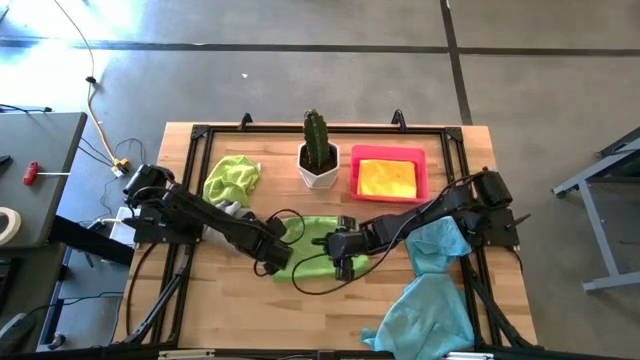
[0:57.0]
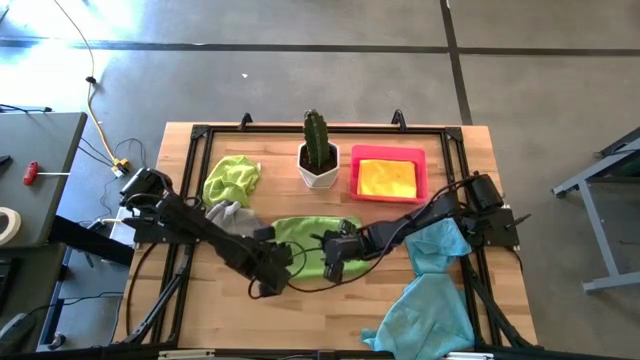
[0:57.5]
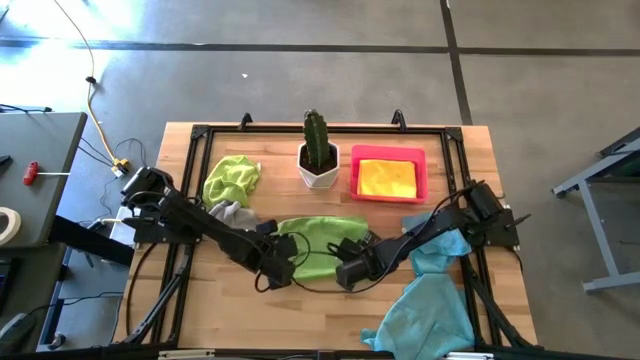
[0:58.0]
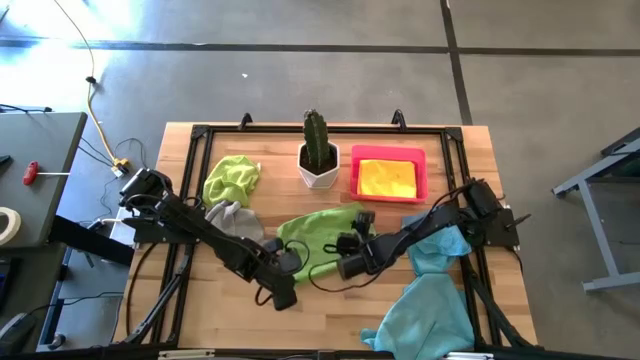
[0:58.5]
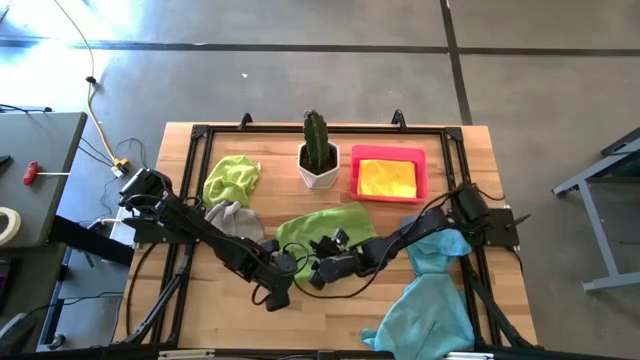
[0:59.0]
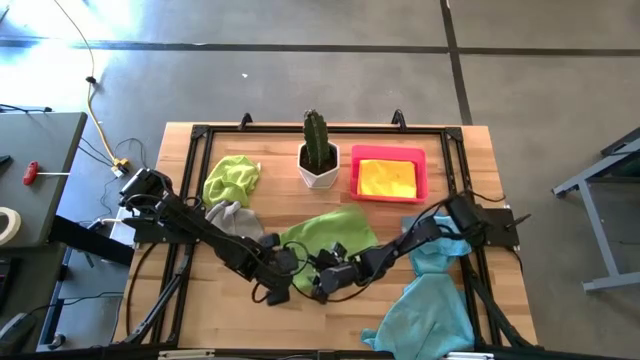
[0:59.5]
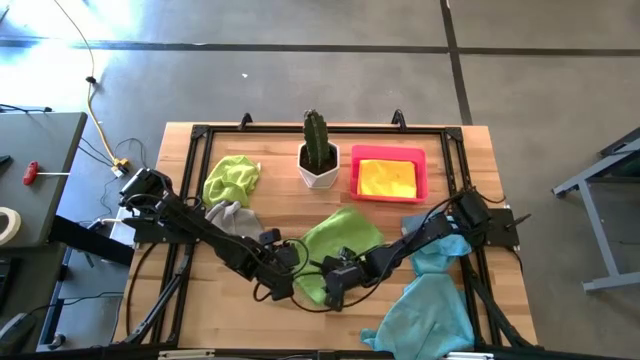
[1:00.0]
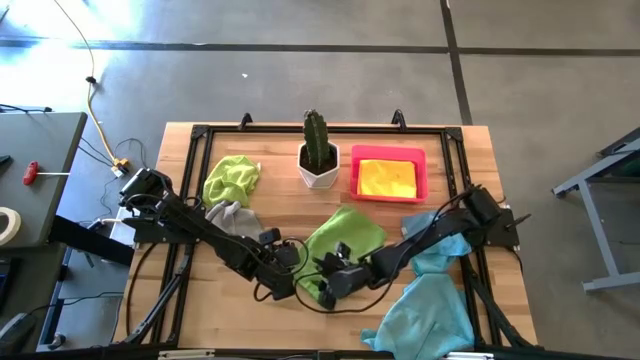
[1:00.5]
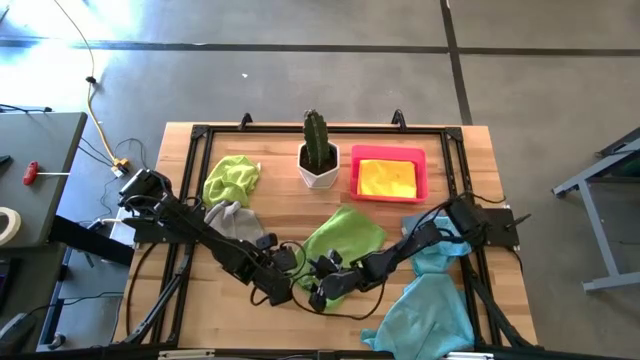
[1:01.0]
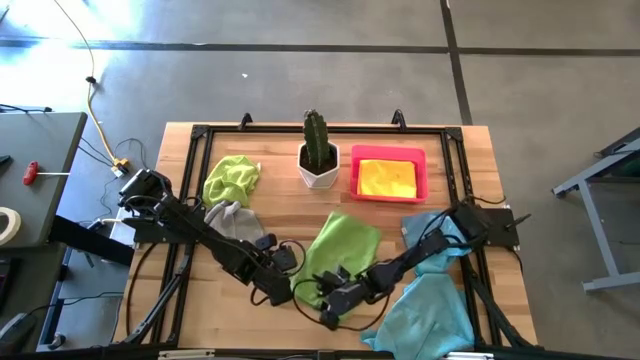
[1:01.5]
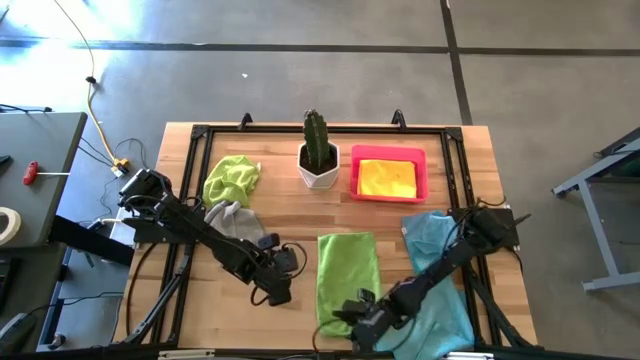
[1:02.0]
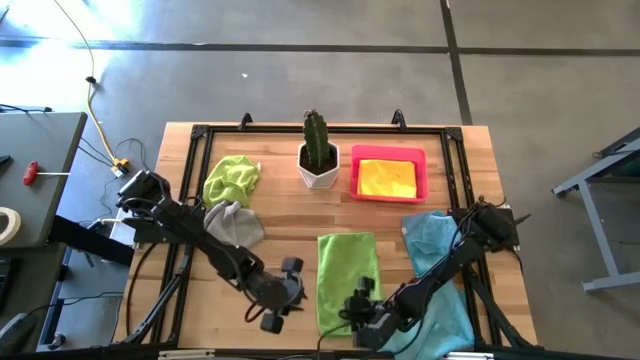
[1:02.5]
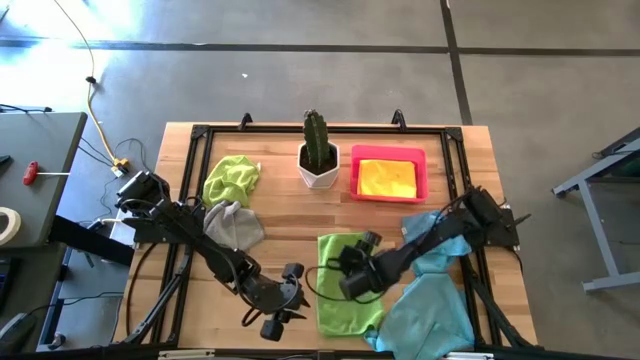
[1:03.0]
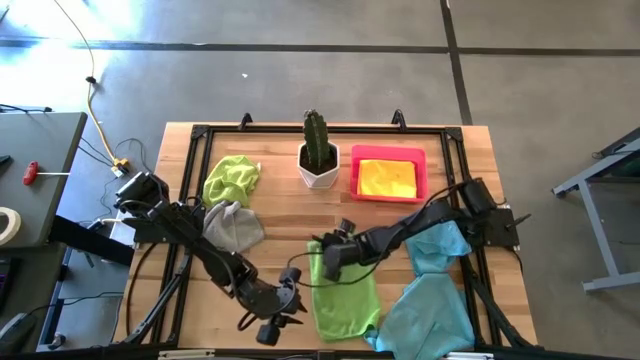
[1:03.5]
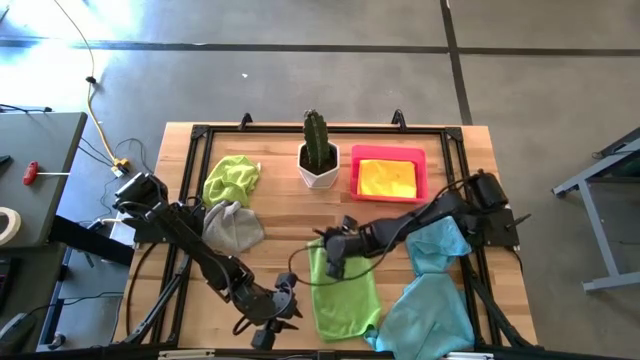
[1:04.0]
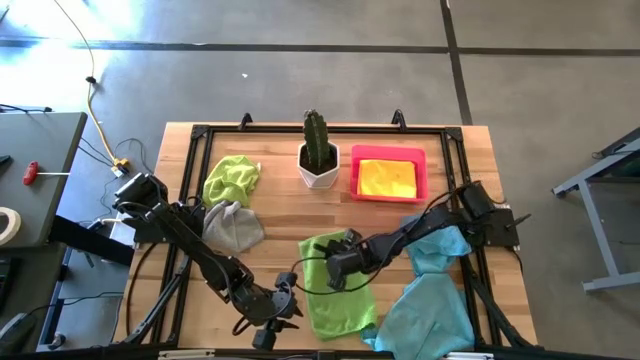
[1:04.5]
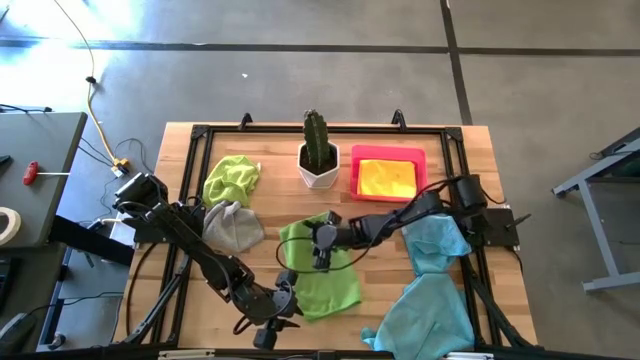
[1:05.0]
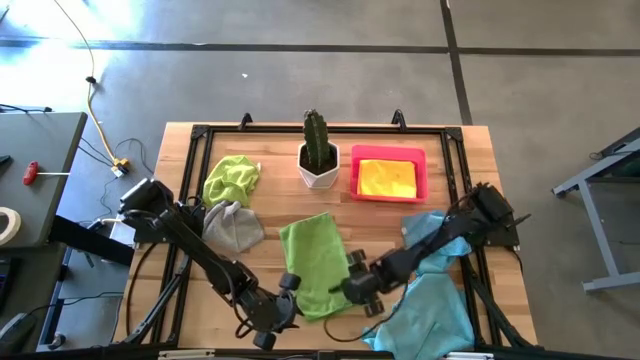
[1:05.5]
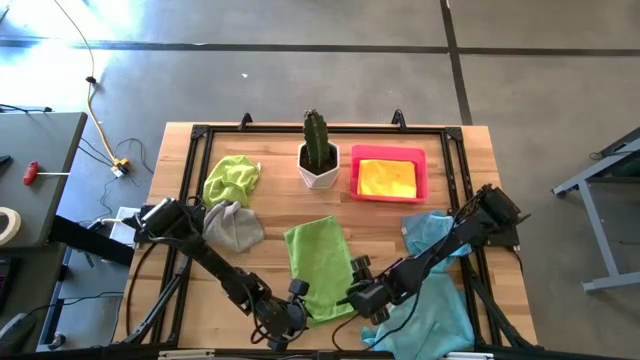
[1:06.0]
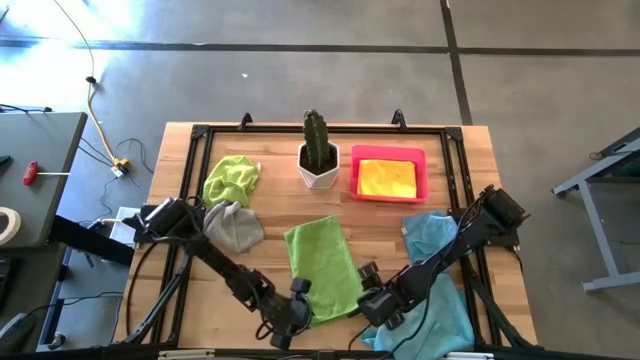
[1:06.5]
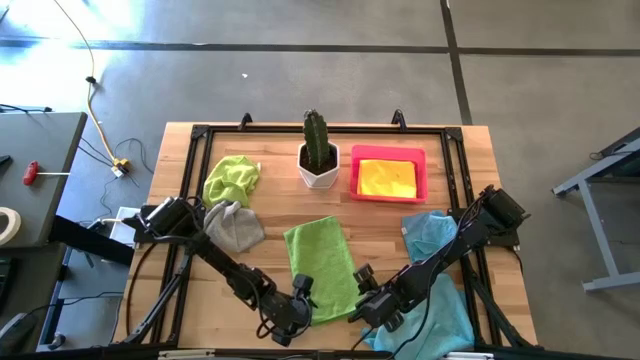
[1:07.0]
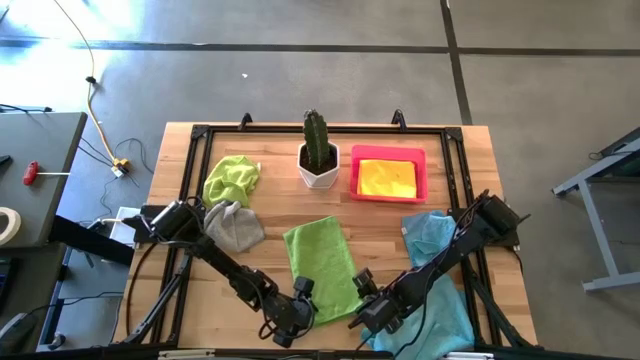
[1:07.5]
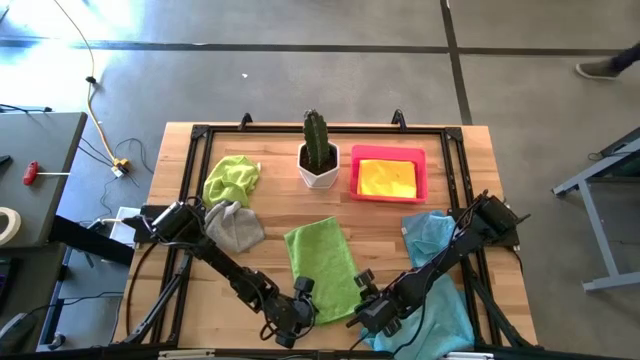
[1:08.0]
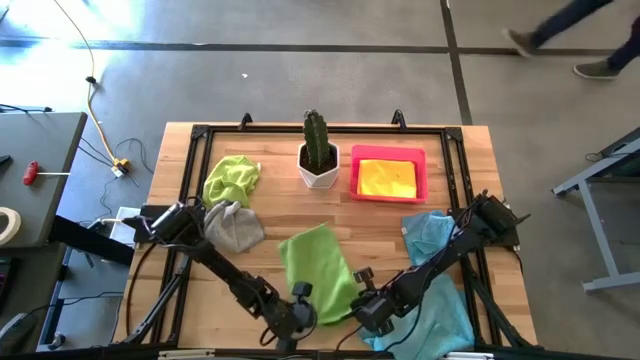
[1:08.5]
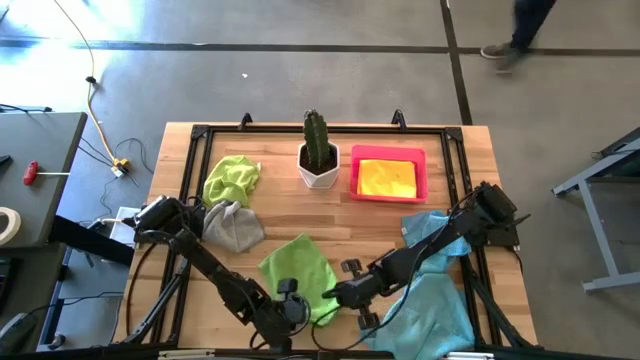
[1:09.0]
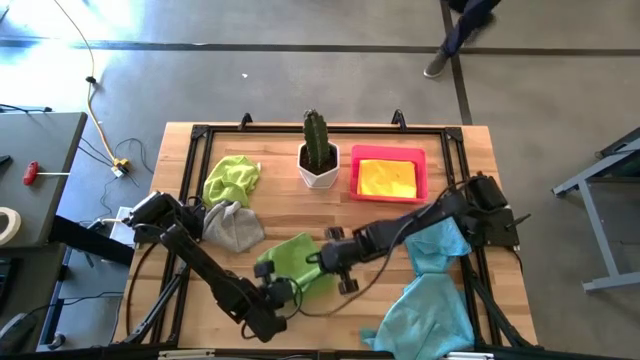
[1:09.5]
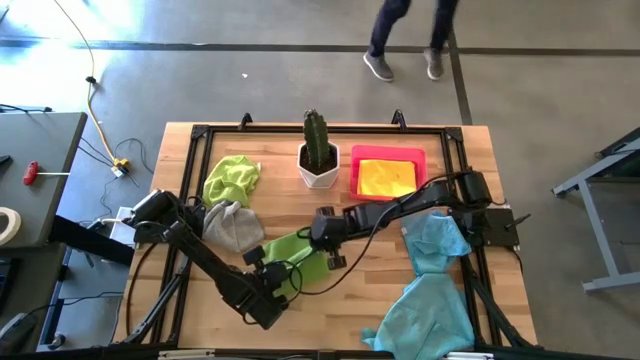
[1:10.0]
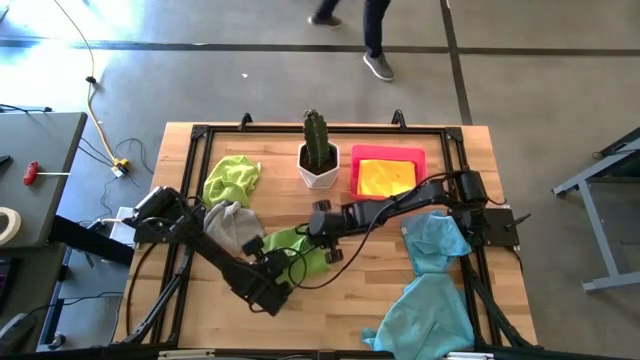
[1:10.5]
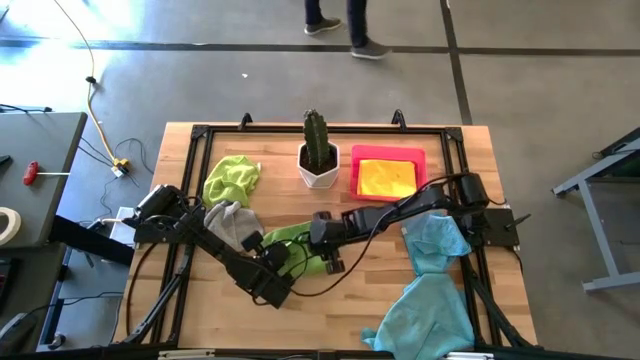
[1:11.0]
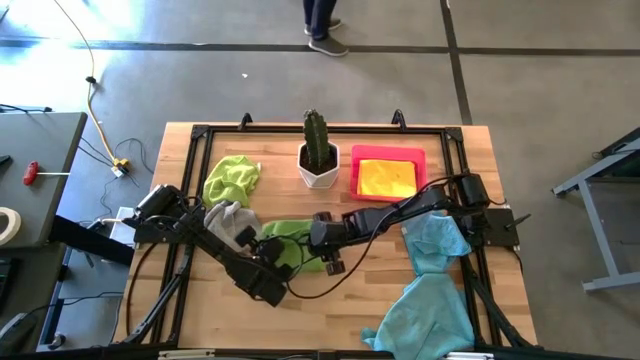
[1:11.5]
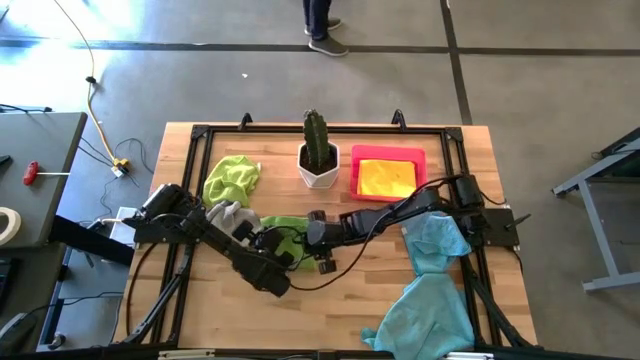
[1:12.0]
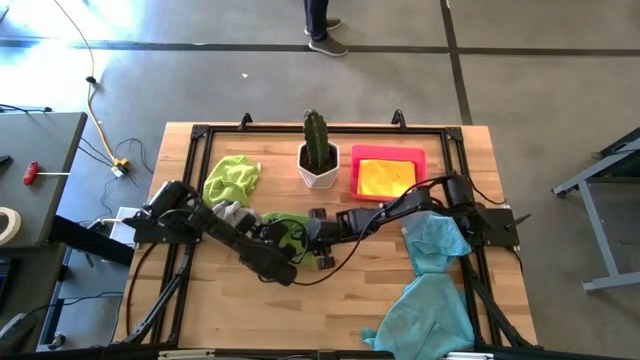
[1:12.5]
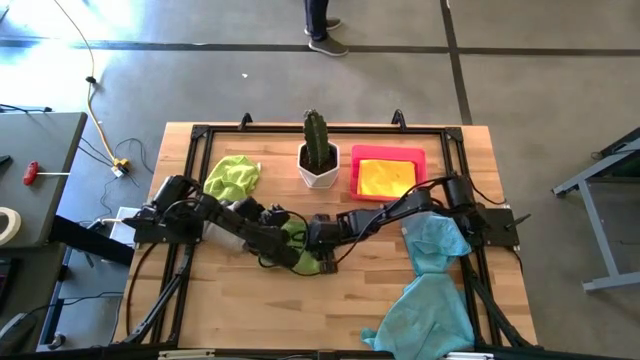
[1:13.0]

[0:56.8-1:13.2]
Task: Fold microfiber towels
Fold the bottom green microfiber towel

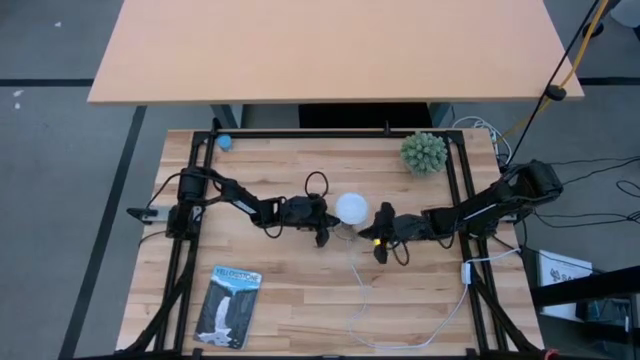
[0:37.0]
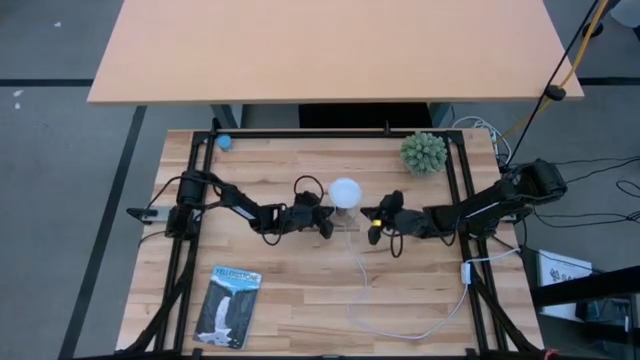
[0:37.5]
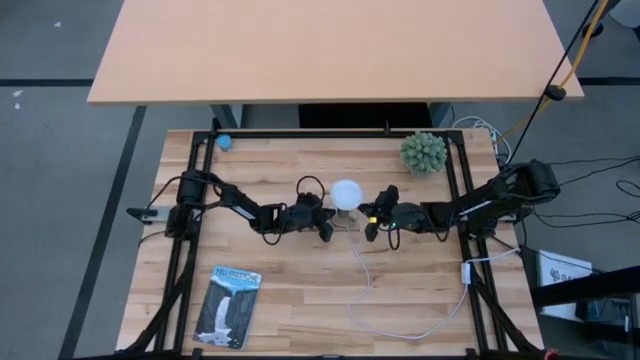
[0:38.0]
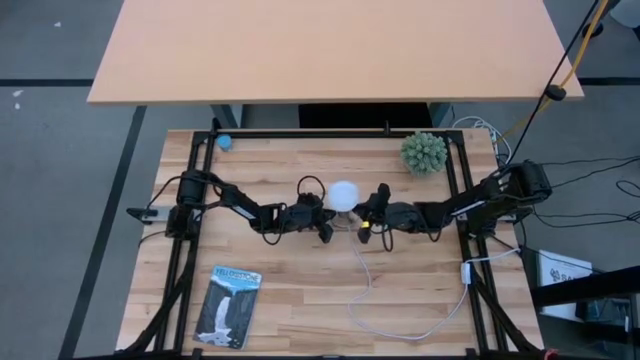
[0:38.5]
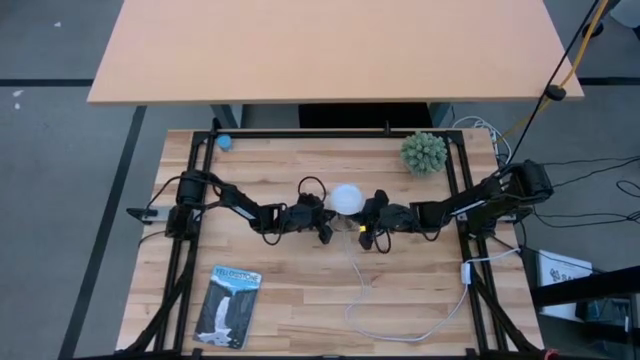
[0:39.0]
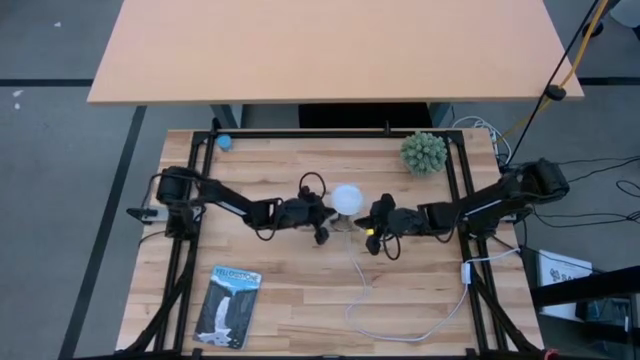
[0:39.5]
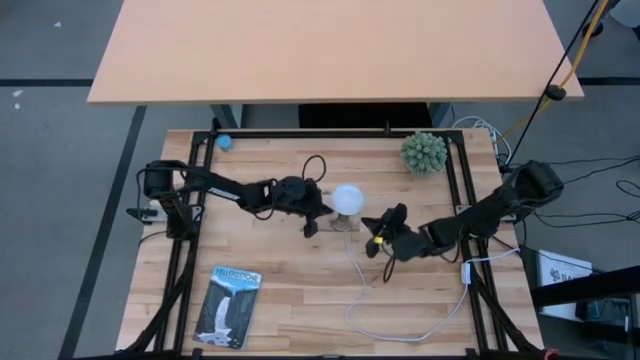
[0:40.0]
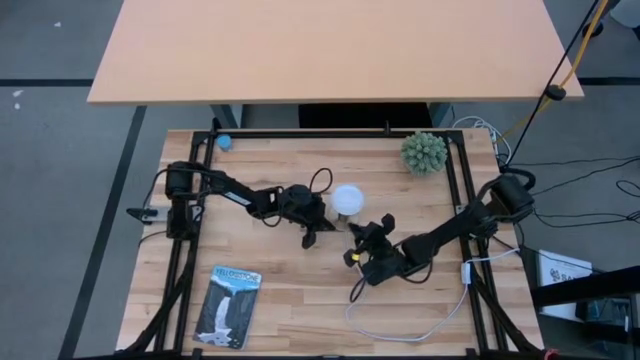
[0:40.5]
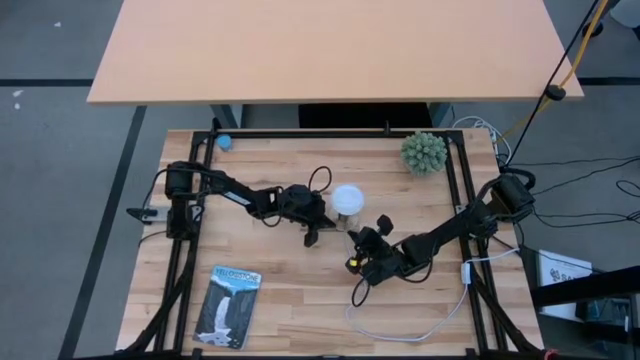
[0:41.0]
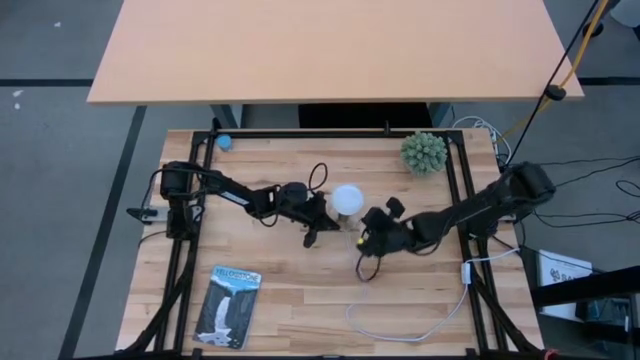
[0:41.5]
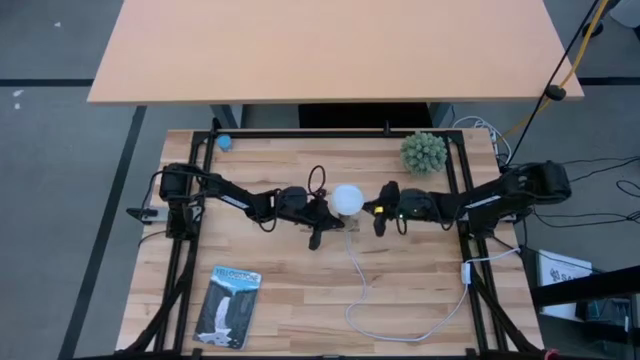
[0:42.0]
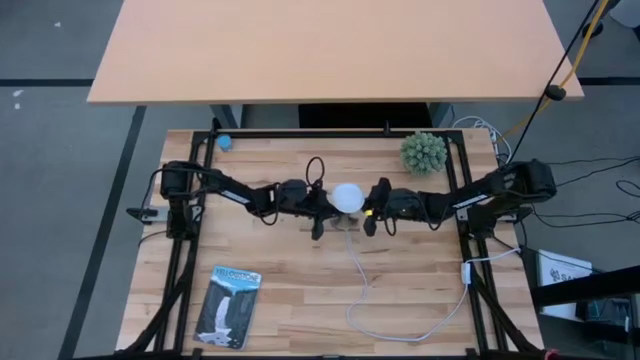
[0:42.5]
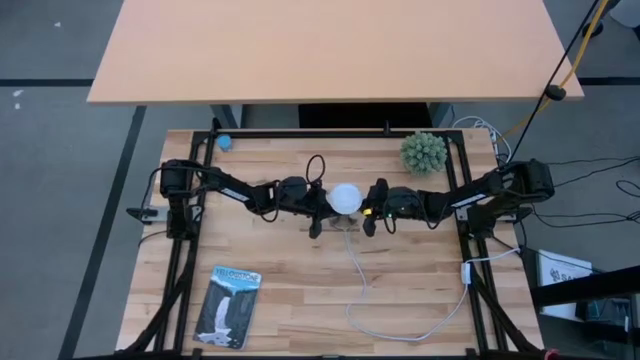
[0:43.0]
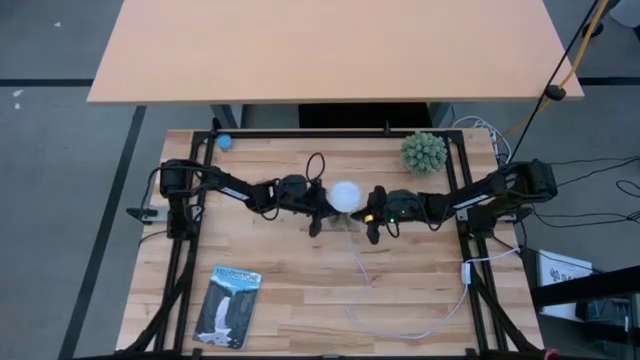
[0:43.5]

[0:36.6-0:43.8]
Task: Screw lightbulb
Insert the lightbulb into the lamp
